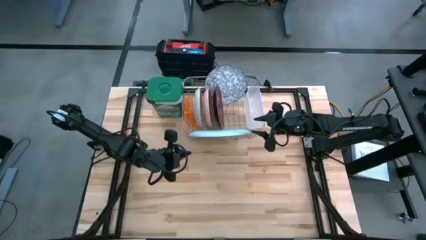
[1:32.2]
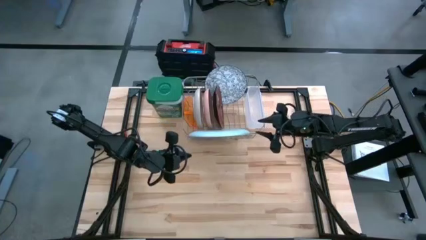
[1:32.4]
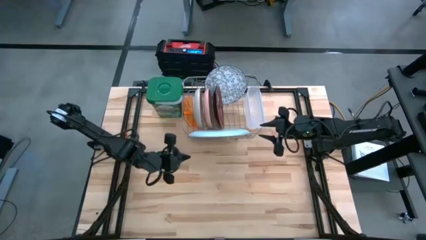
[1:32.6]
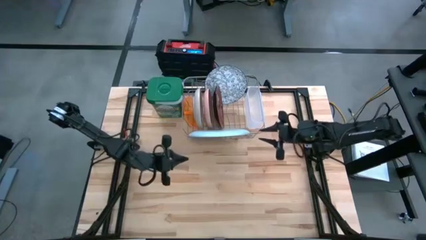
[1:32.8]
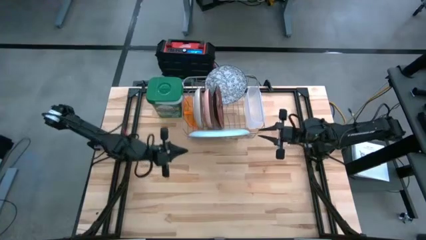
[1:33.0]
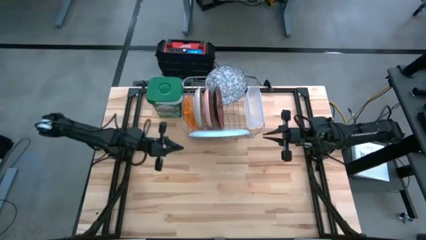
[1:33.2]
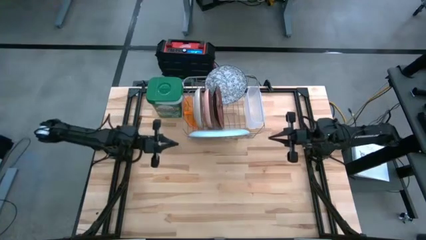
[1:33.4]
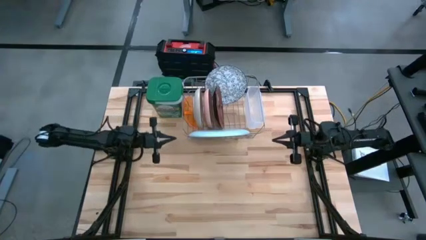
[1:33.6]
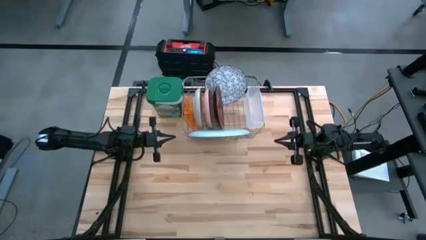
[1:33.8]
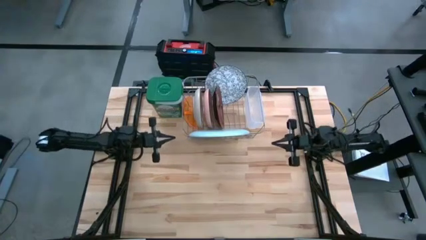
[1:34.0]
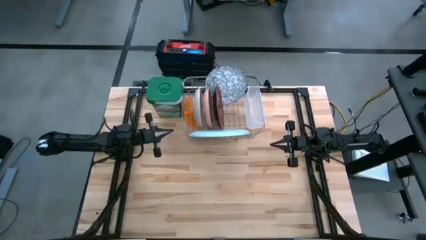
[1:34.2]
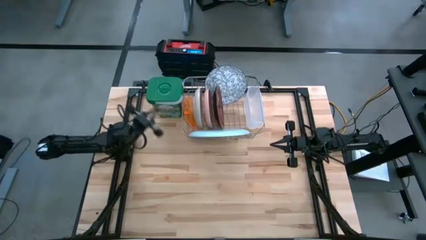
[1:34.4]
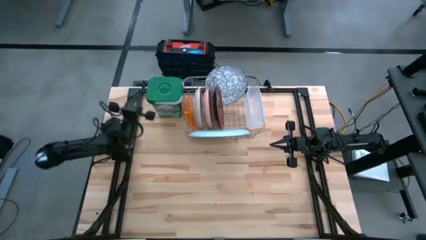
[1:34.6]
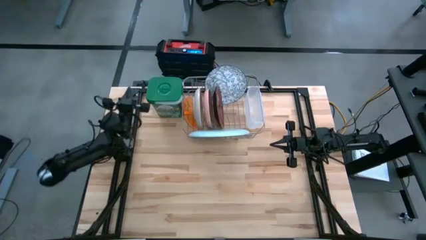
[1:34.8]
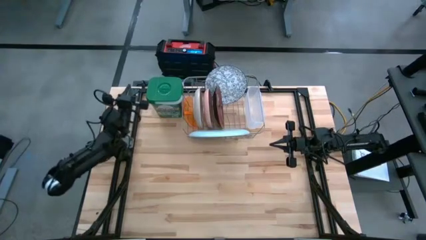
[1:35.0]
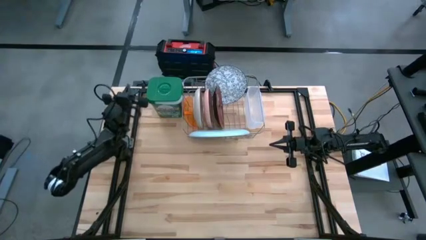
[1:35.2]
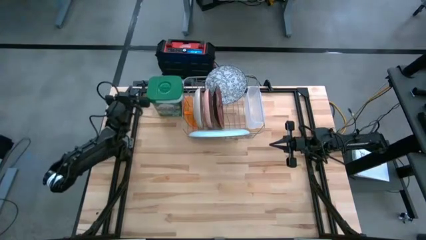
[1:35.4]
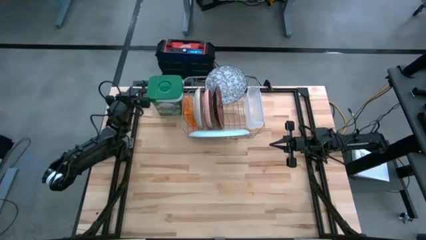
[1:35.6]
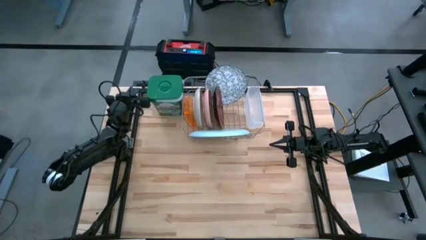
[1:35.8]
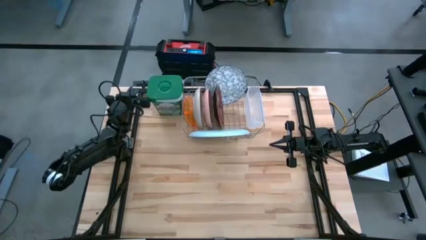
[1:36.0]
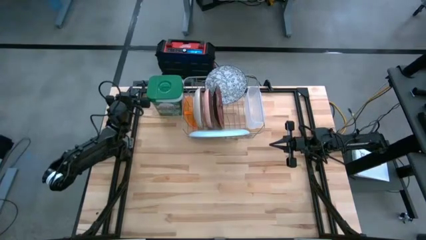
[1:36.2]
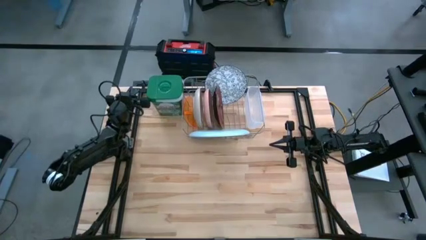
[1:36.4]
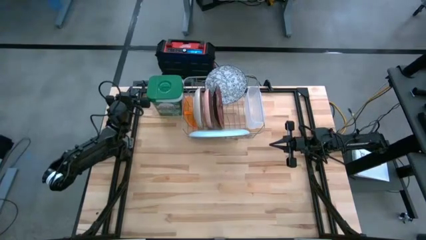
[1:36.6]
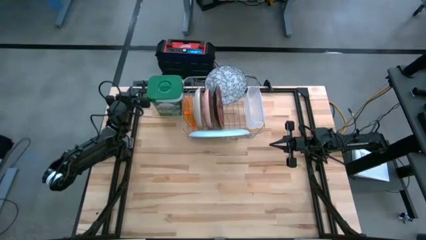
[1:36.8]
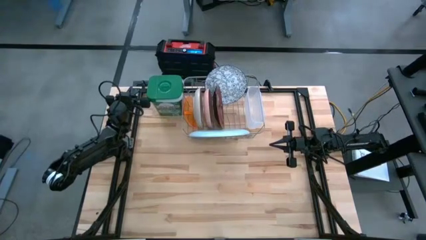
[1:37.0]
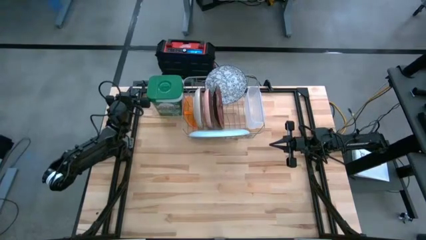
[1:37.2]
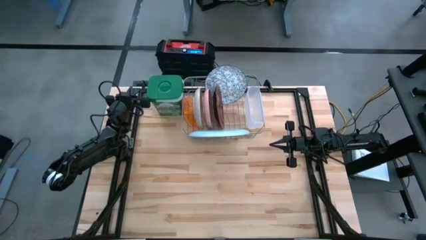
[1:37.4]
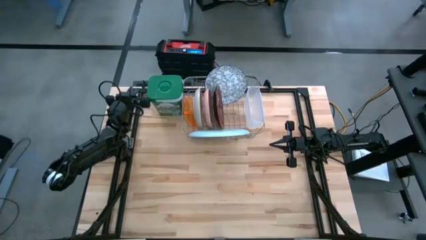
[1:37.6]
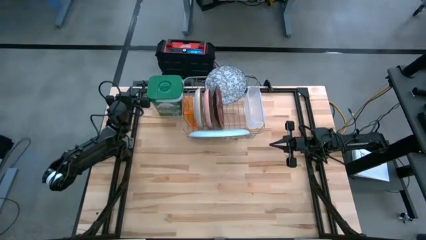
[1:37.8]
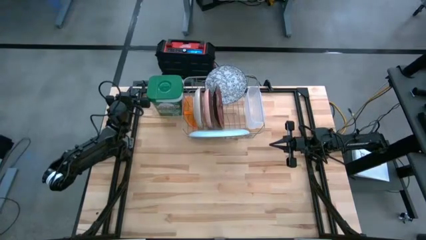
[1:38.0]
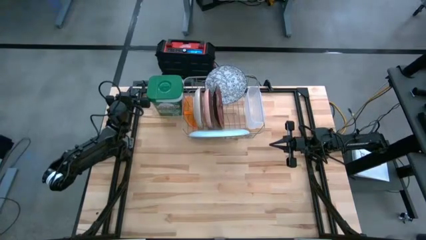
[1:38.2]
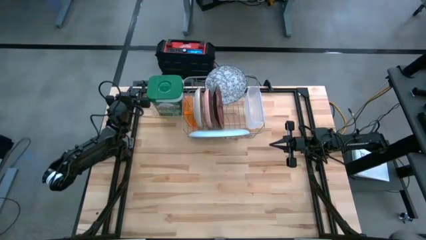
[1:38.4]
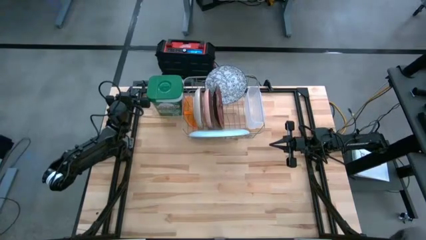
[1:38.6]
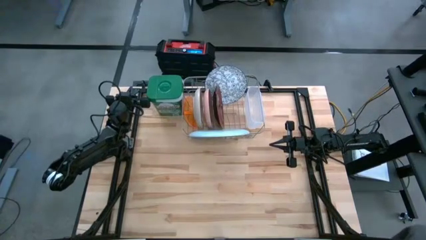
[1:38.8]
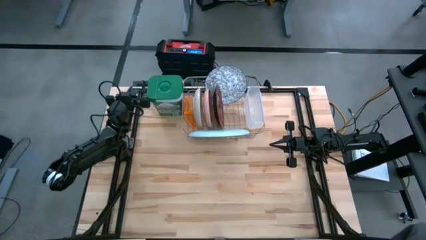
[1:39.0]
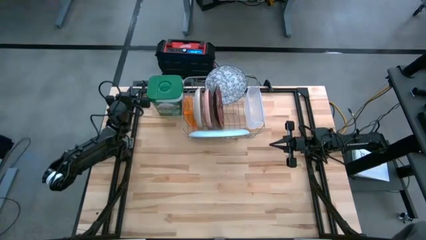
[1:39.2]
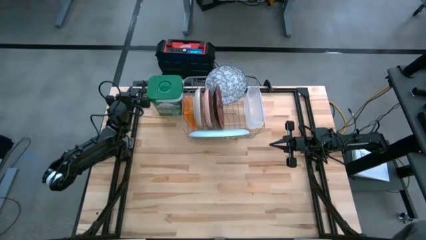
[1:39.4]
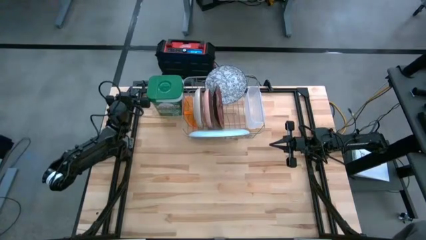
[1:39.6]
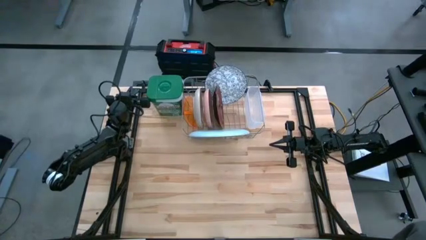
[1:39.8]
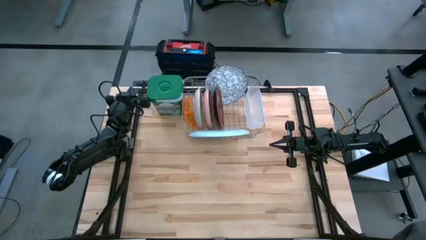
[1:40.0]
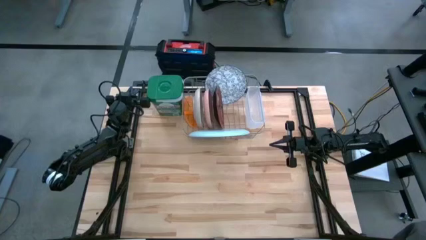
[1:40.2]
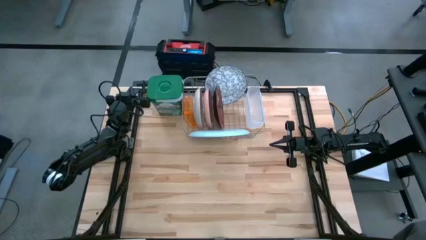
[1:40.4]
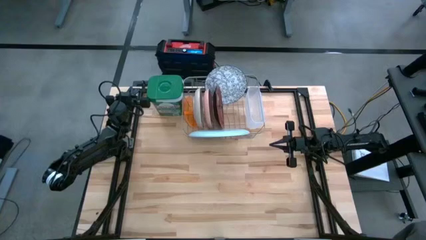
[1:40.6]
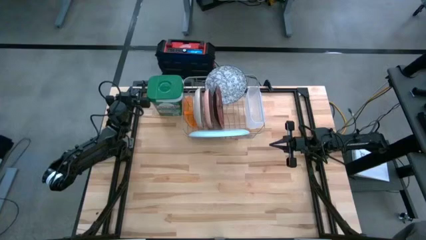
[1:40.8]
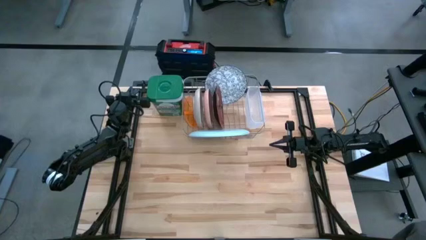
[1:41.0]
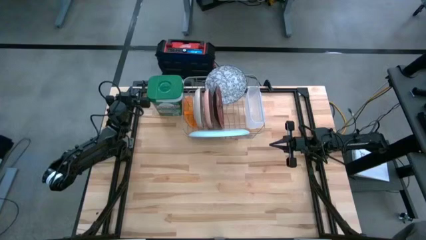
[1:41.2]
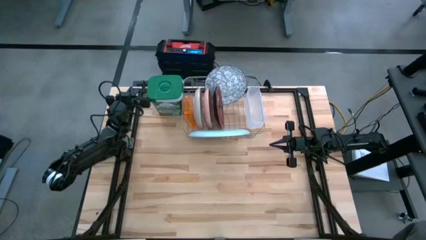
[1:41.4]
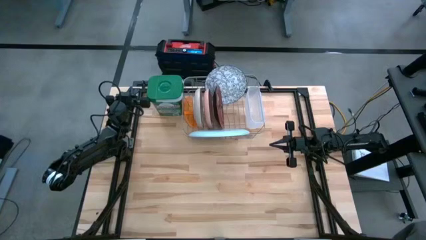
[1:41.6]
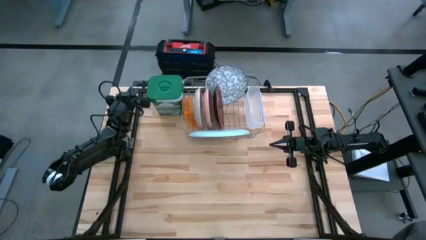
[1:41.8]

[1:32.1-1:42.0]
Task: Sort dishes
Return to Home Position

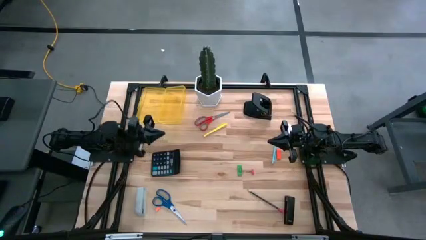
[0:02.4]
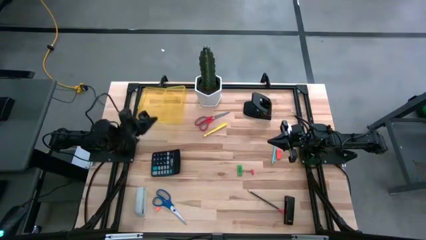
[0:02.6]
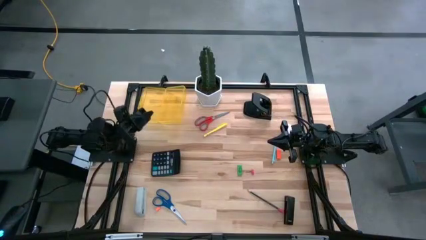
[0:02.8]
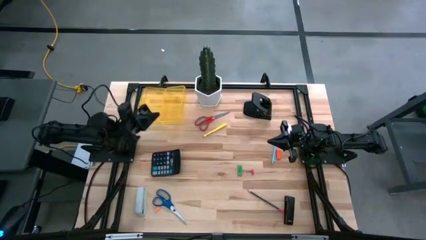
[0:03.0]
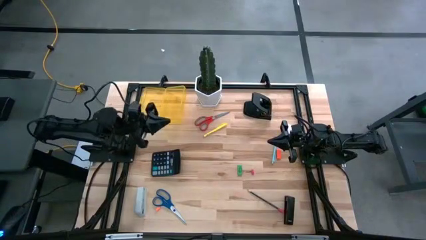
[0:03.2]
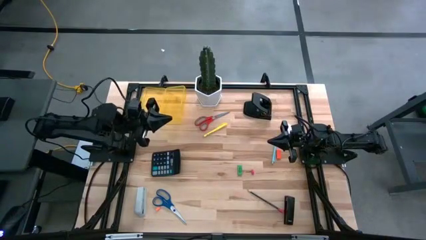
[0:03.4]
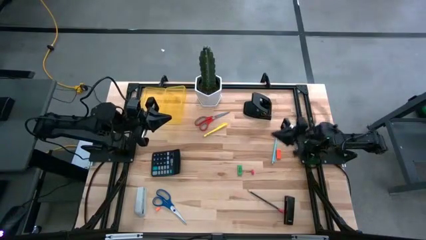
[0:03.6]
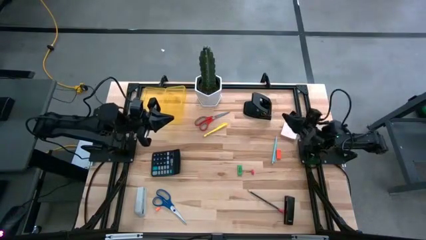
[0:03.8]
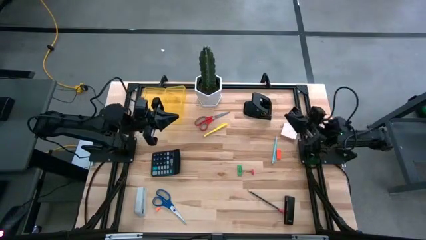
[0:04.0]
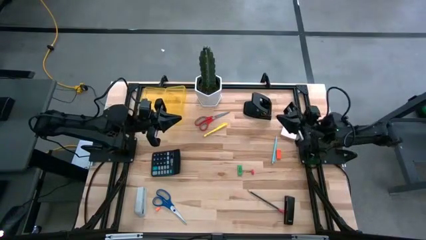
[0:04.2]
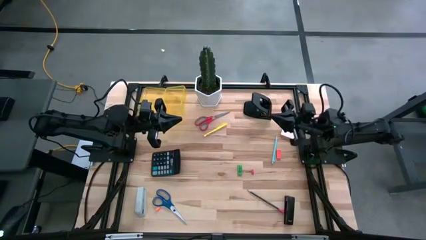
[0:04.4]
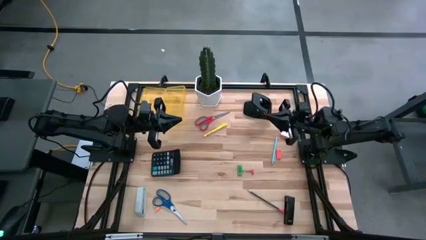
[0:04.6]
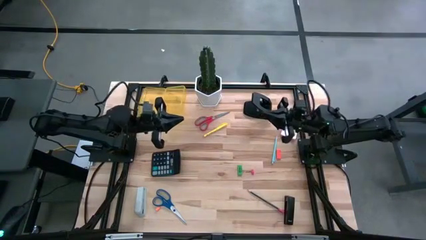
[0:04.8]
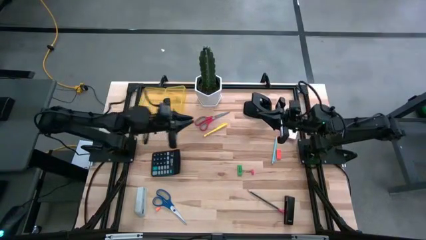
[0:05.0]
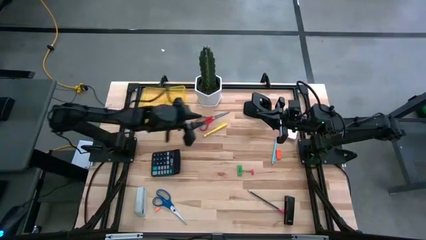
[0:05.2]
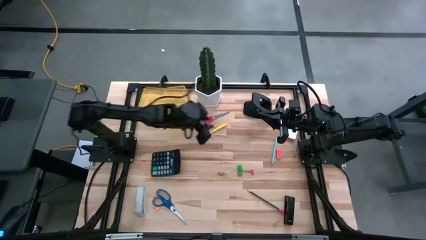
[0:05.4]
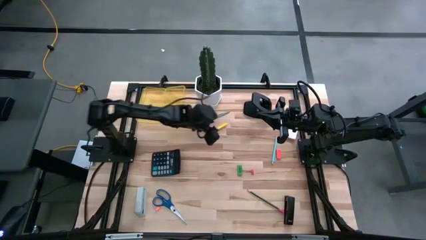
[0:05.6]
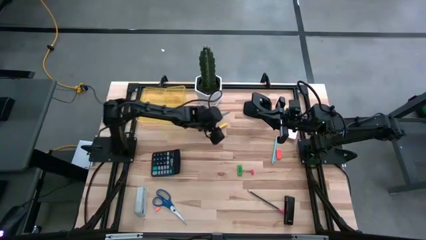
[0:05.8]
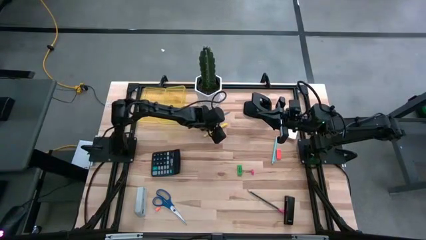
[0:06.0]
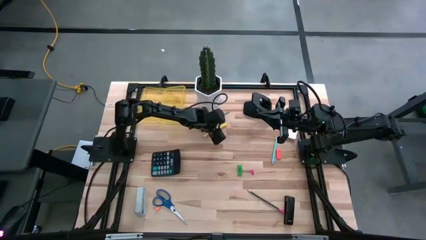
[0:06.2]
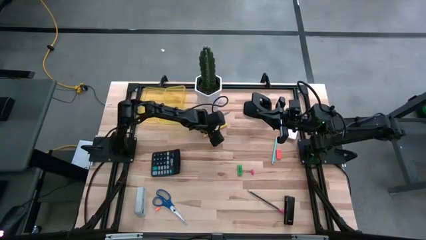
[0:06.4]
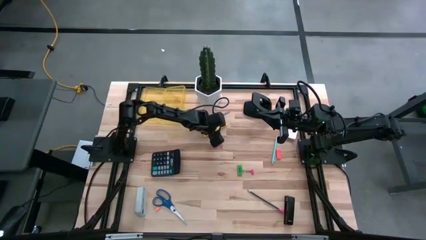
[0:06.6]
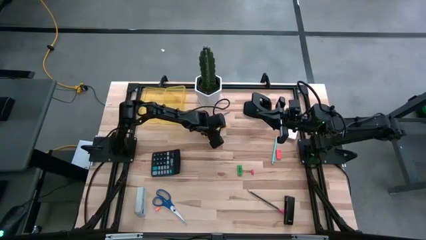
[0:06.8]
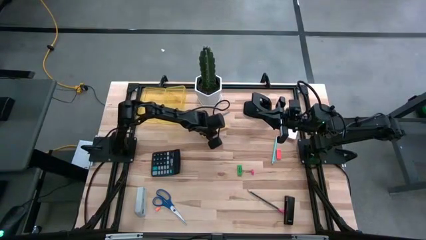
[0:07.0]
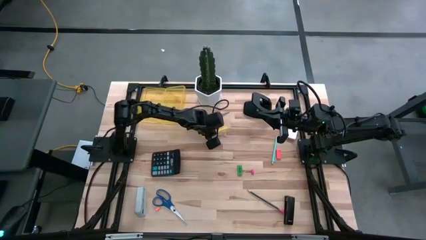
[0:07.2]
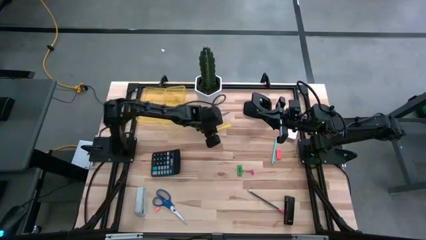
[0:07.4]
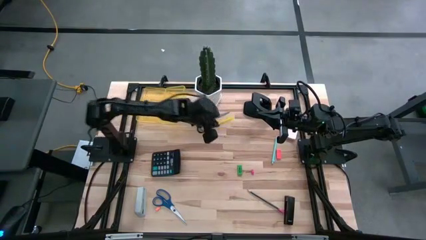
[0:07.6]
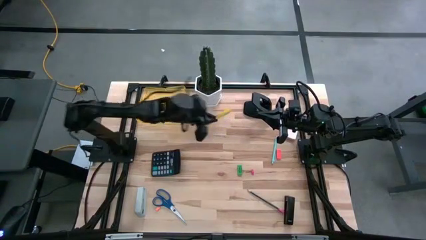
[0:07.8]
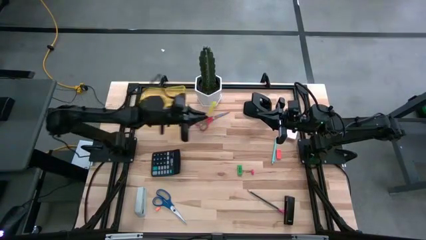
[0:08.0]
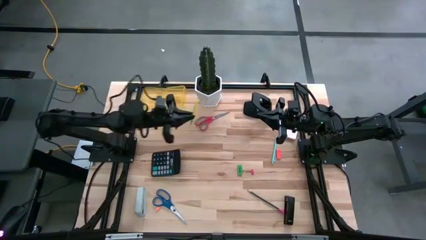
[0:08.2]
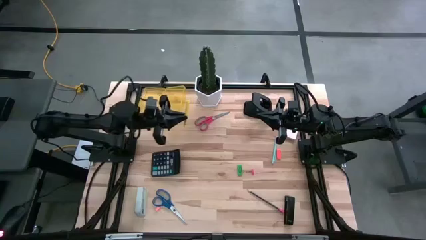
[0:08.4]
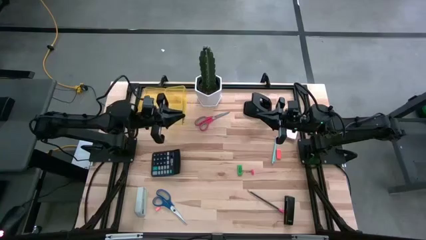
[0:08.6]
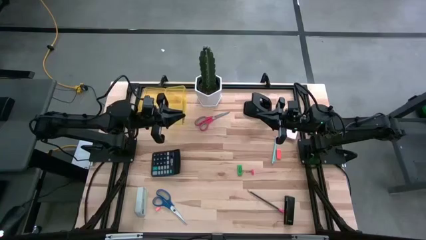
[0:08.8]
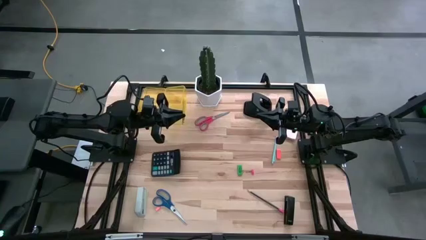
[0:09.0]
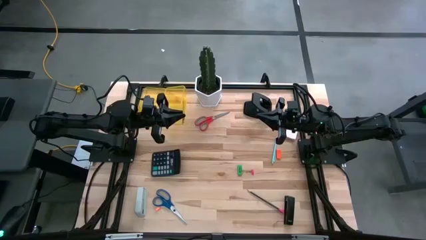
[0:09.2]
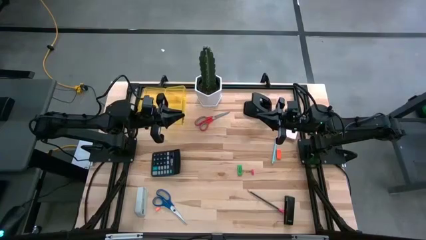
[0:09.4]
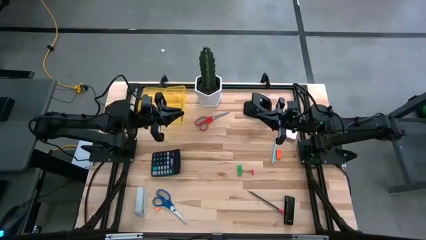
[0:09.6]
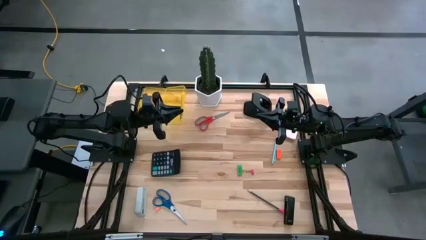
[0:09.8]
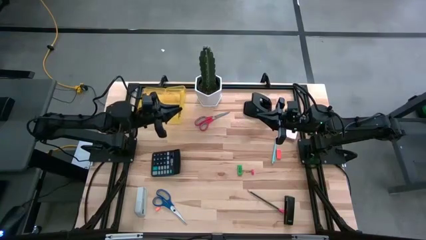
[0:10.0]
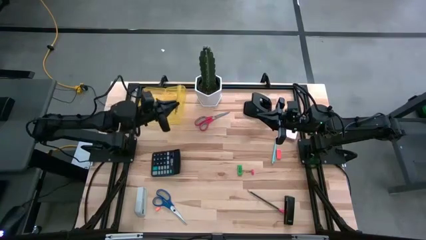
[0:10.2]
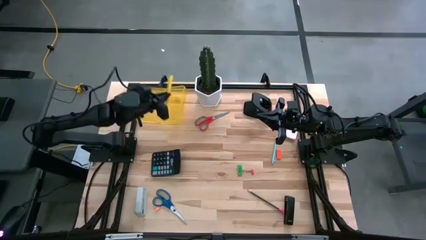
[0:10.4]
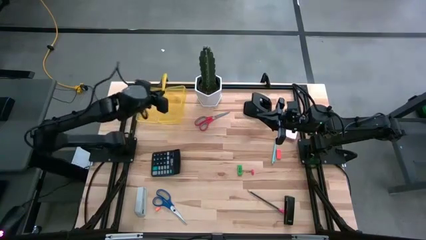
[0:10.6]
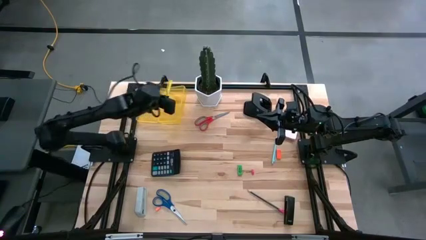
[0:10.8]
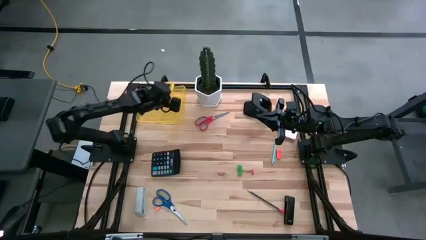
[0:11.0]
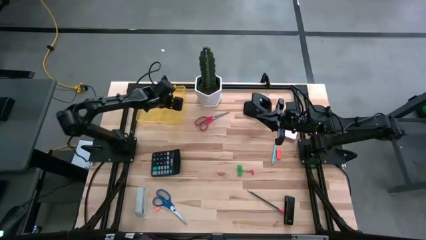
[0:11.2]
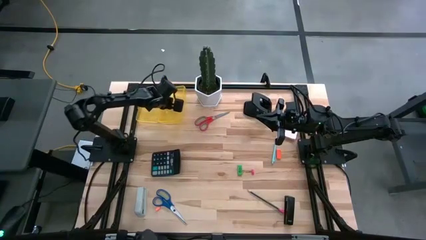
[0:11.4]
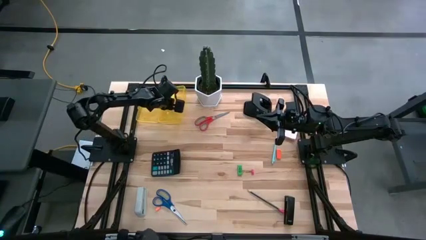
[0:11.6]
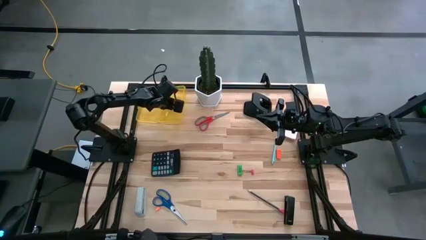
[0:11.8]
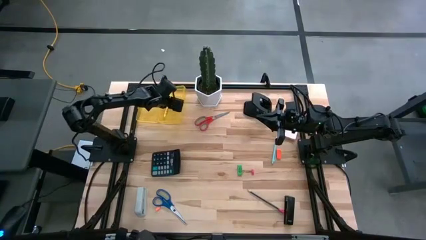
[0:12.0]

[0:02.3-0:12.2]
Task: Pack school essentials
Put the yellow pen into the transparent yellow supply box
